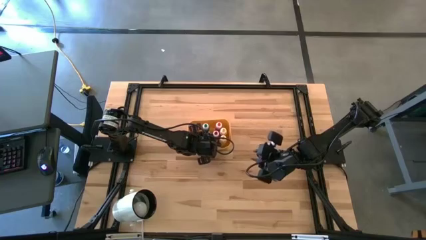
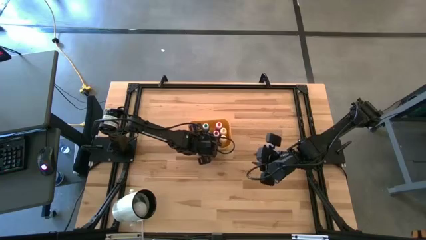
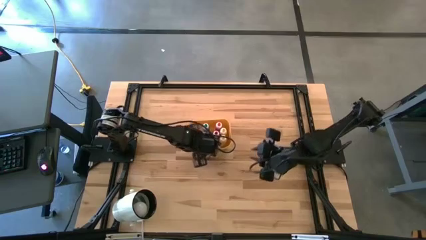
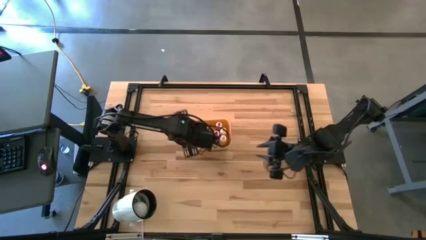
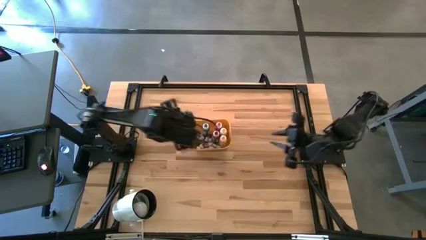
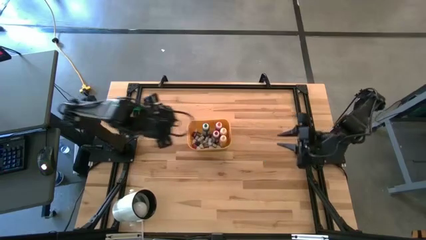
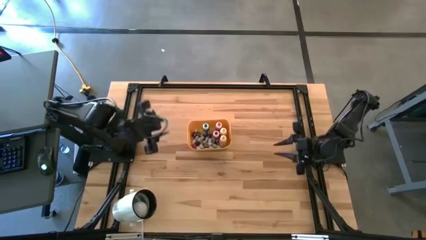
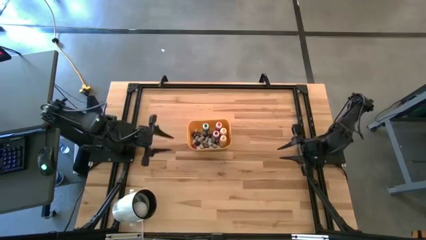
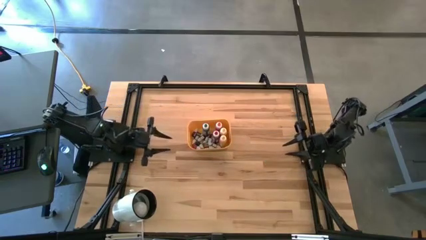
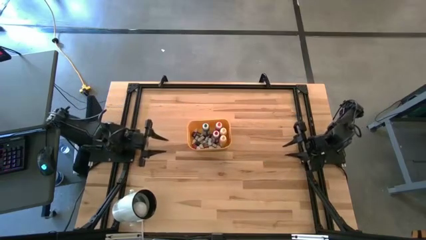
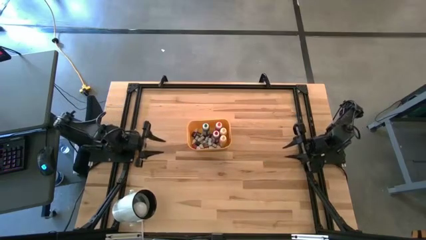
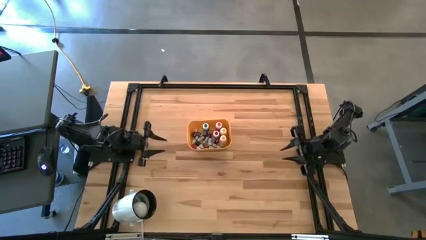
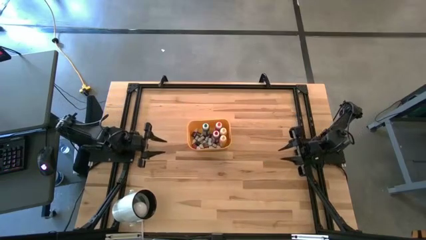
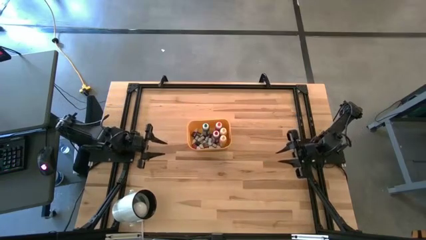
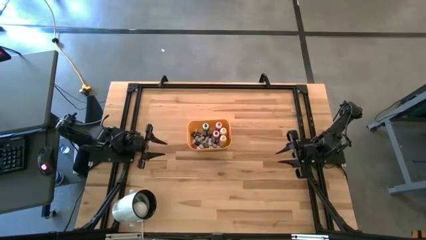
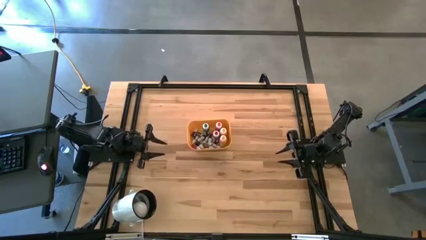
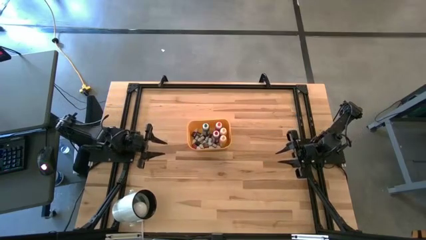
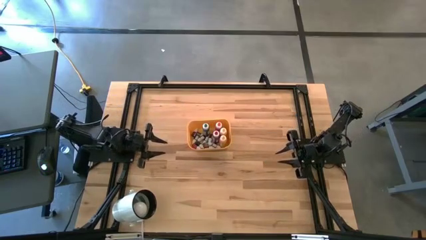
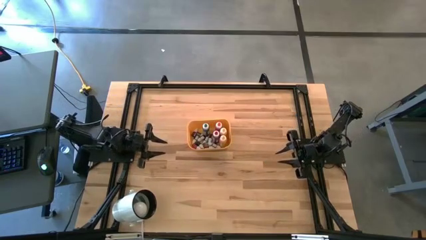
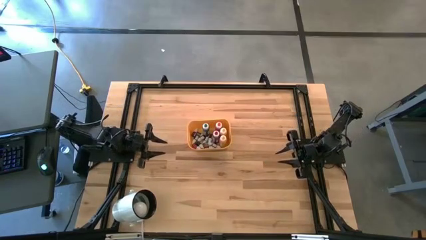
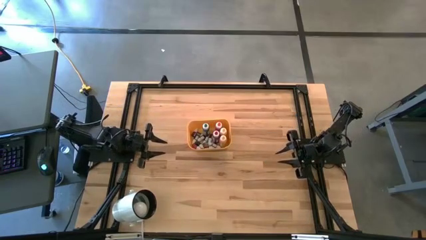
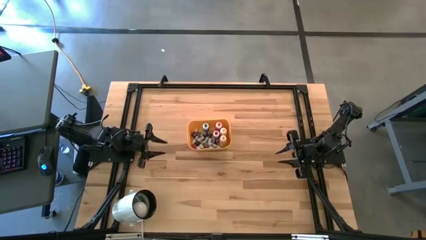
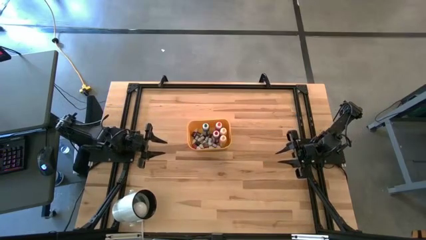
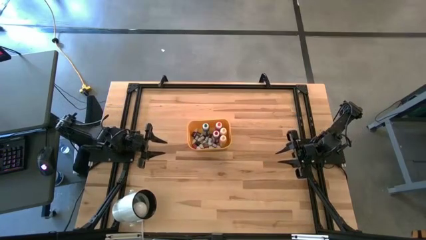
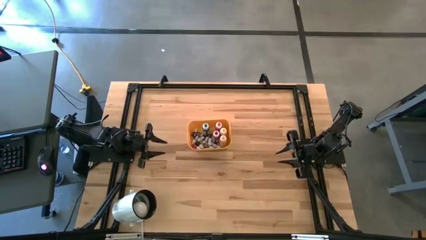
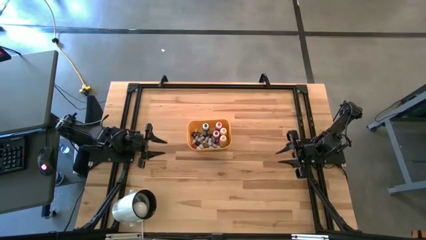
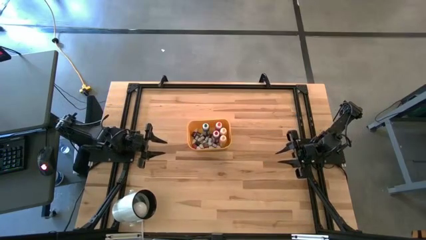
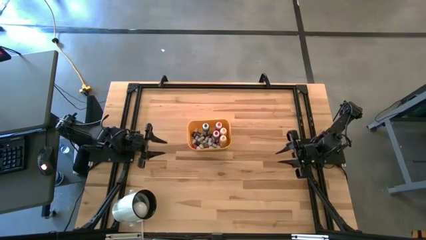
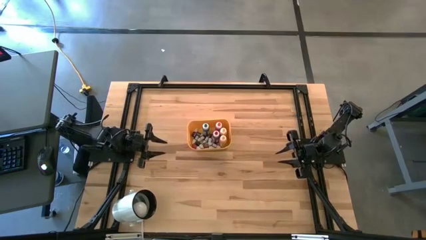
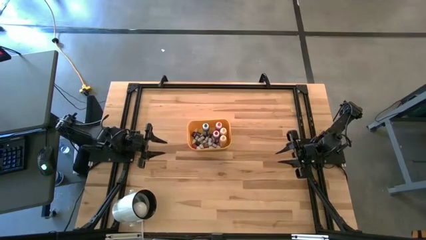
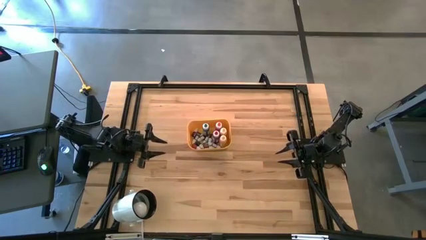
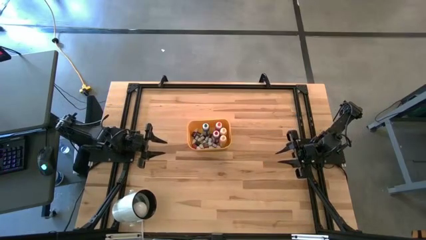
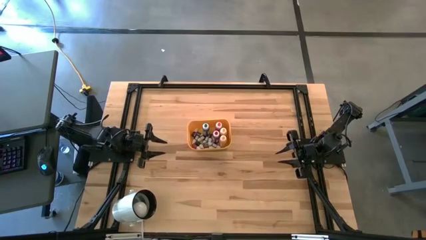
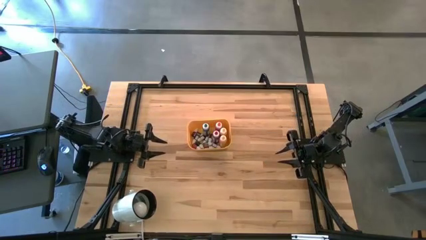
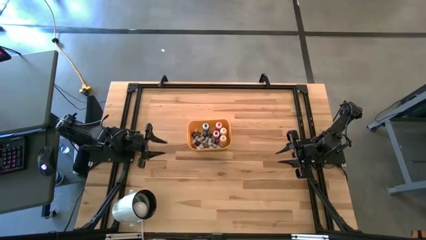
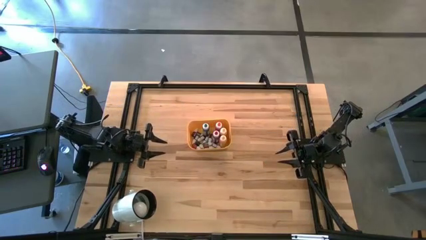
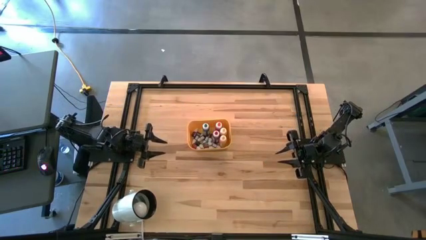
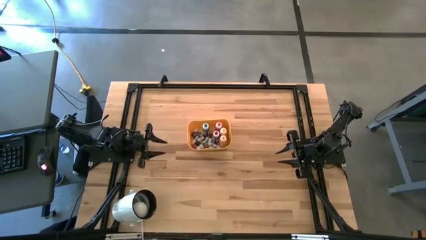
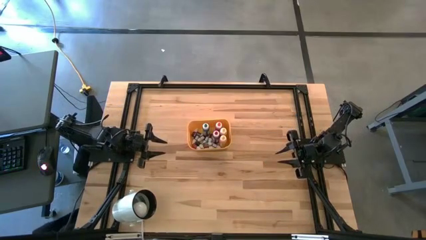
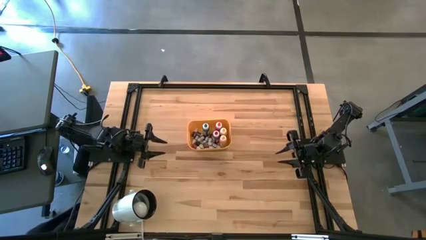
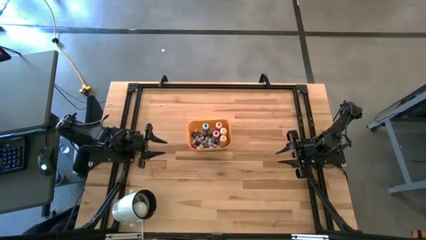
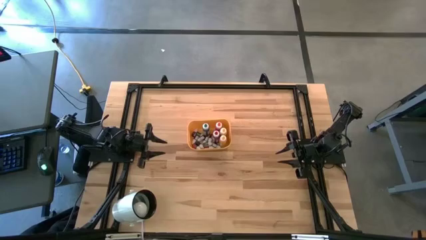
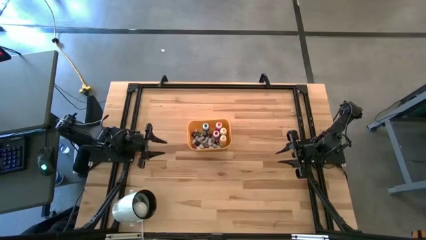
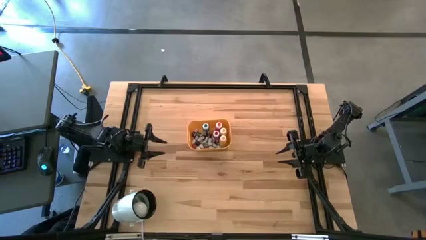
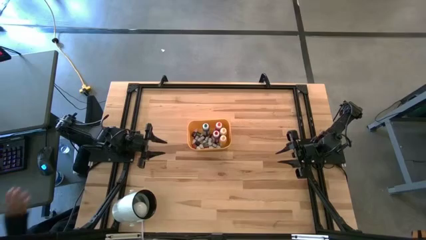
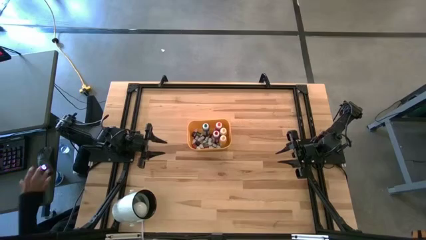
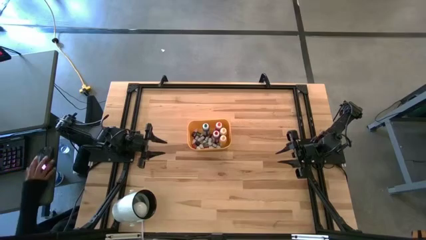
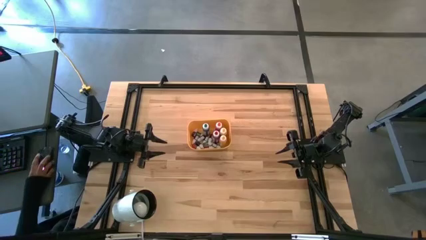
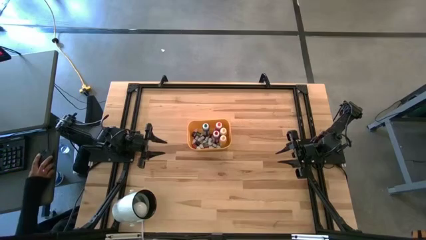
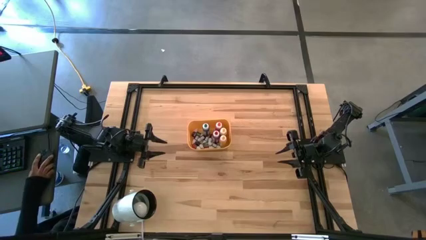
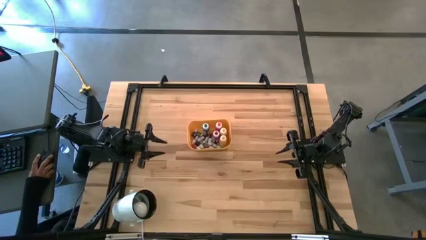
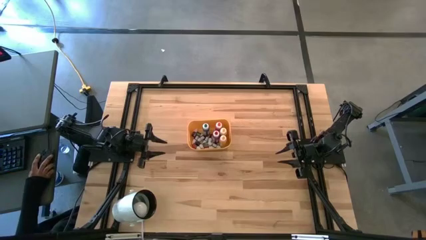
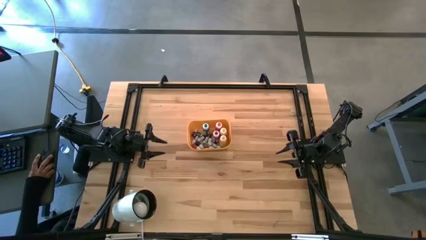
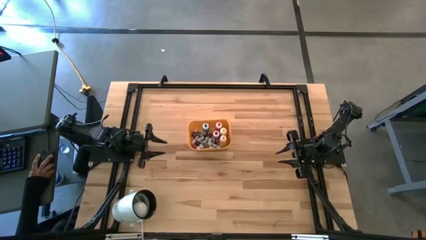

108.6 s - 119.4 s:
Task: Pick & Place food coloring
Return to Home Position
